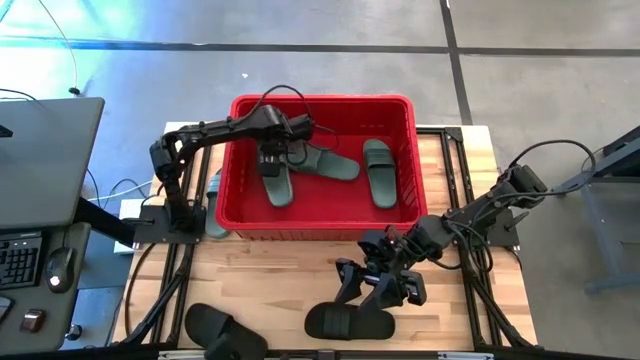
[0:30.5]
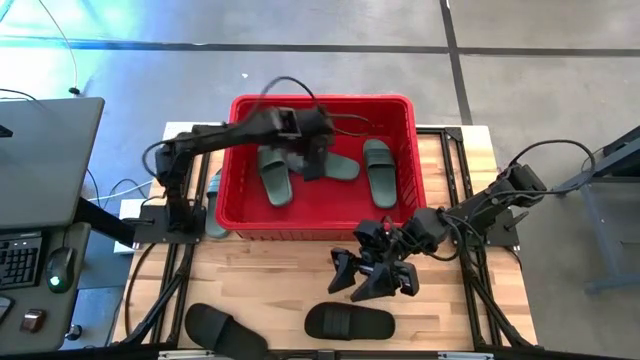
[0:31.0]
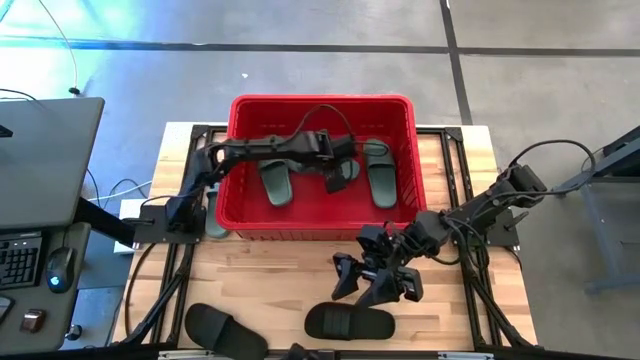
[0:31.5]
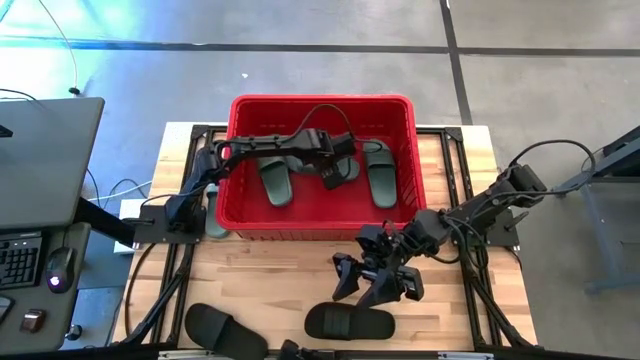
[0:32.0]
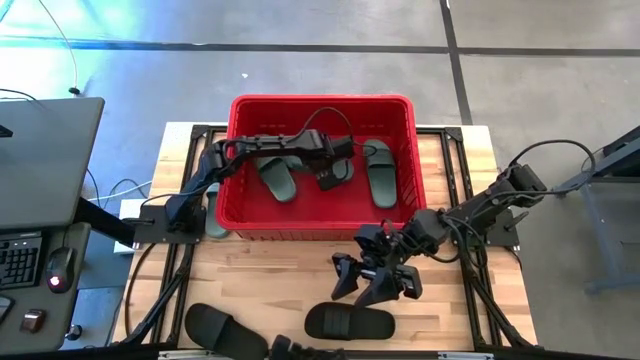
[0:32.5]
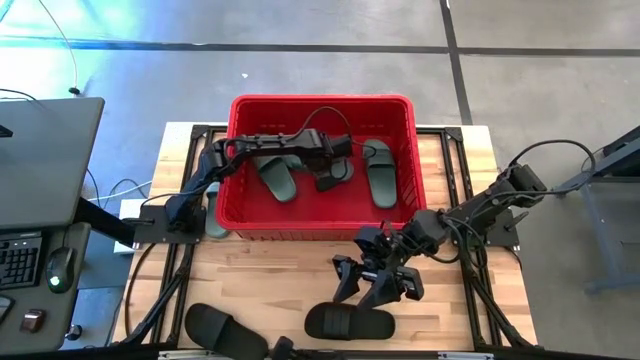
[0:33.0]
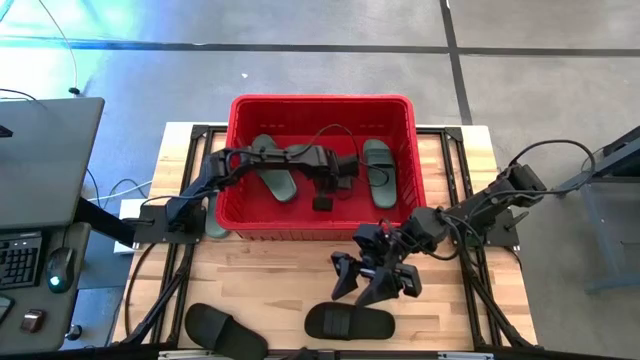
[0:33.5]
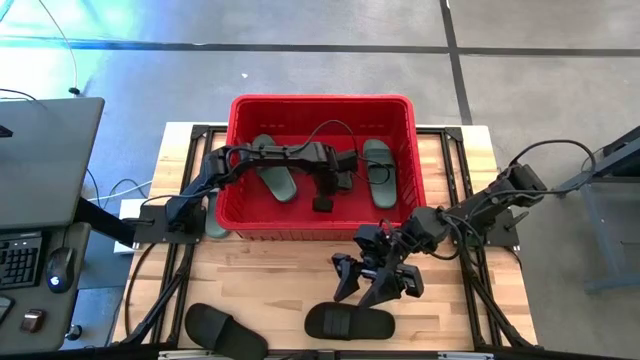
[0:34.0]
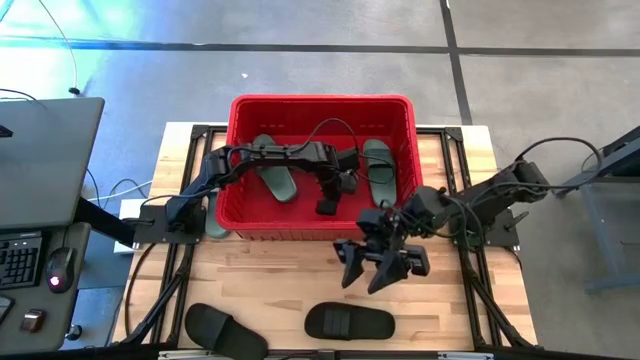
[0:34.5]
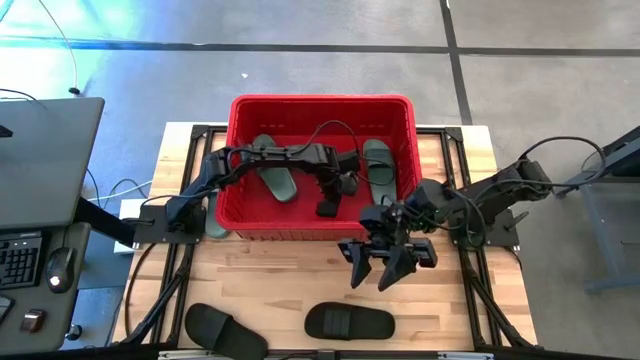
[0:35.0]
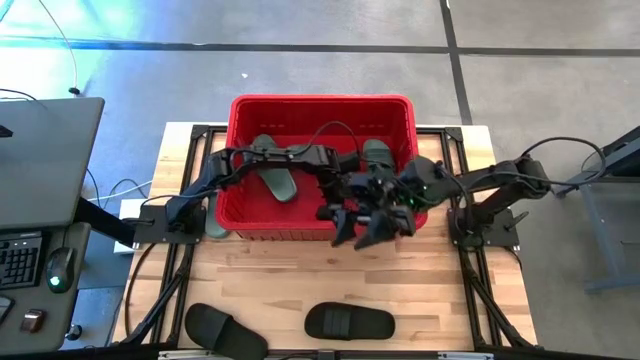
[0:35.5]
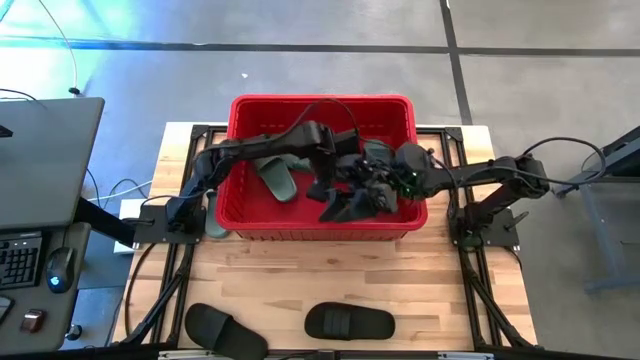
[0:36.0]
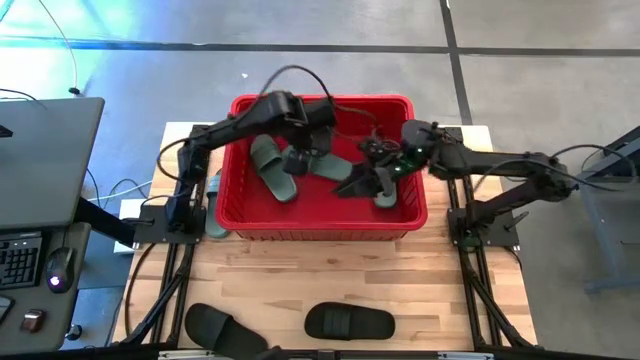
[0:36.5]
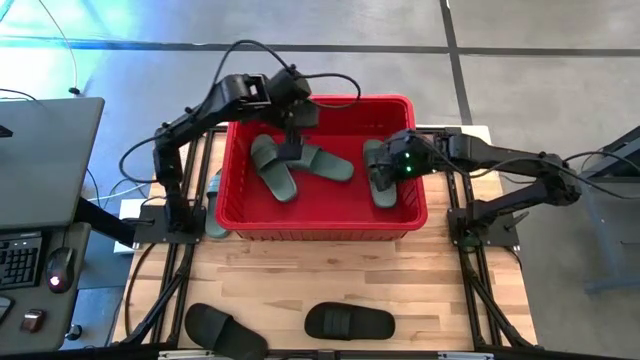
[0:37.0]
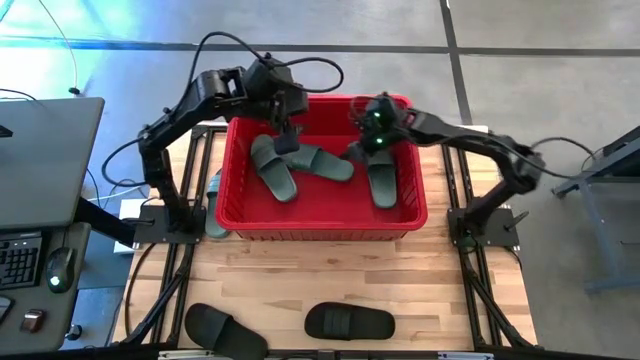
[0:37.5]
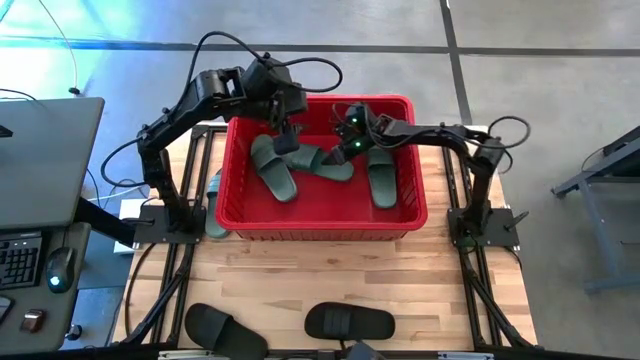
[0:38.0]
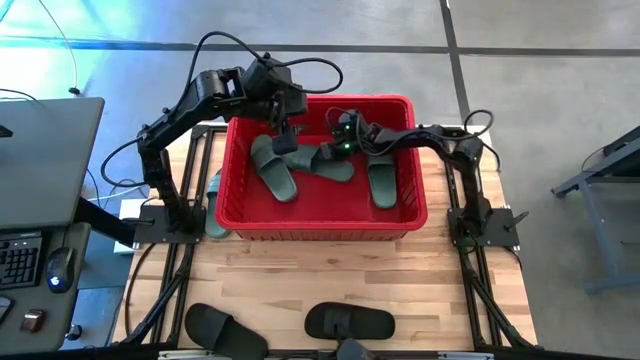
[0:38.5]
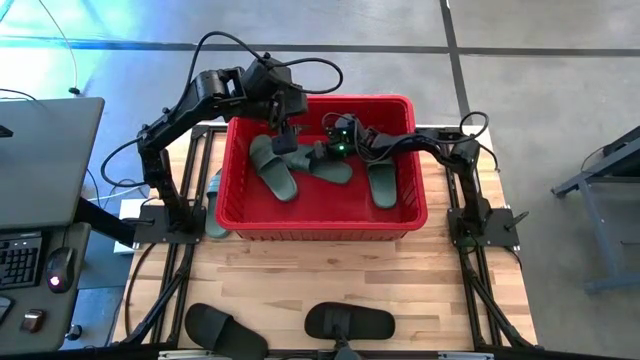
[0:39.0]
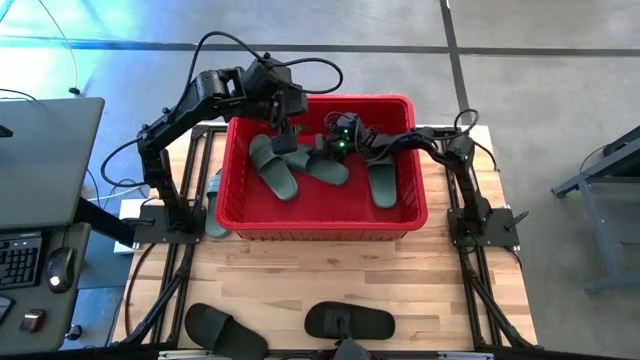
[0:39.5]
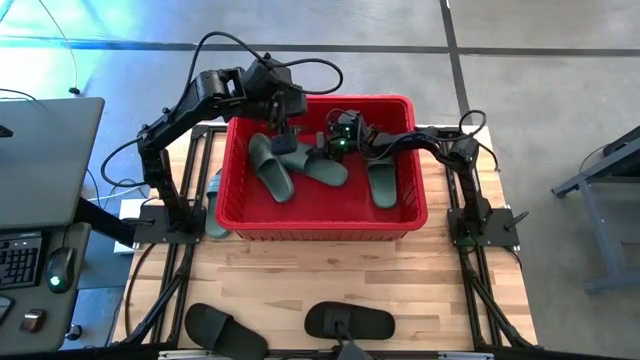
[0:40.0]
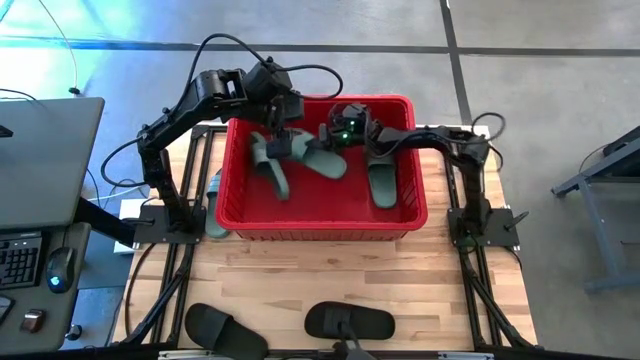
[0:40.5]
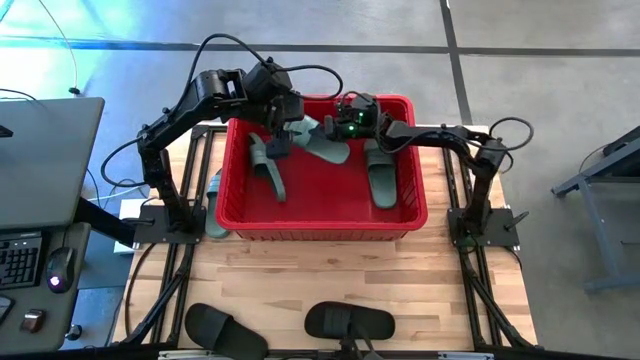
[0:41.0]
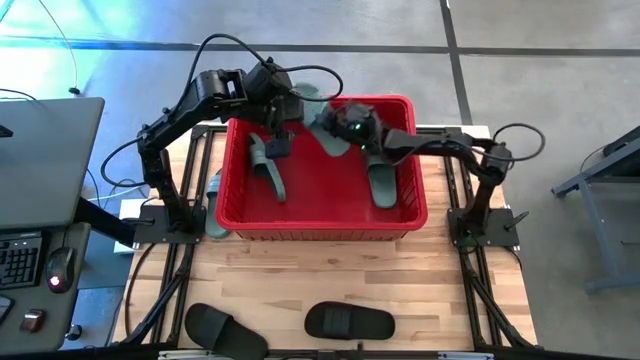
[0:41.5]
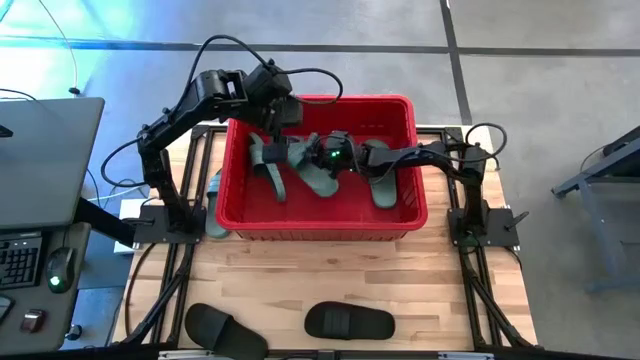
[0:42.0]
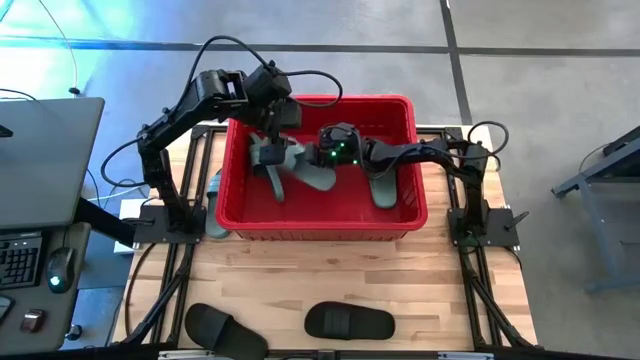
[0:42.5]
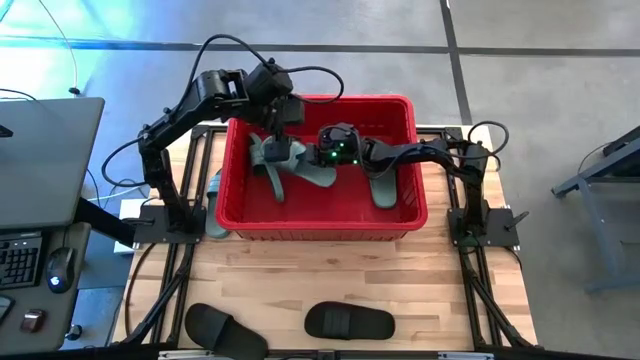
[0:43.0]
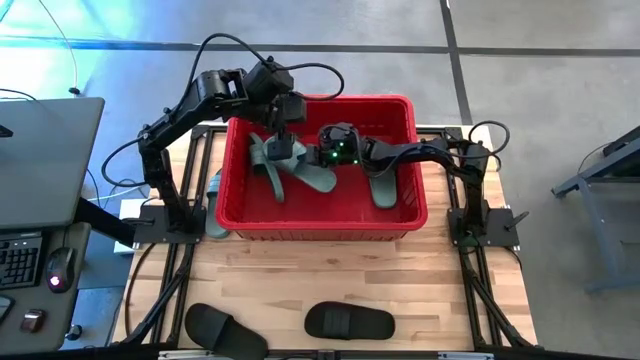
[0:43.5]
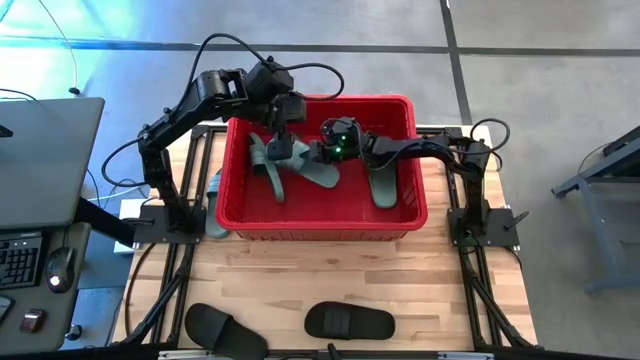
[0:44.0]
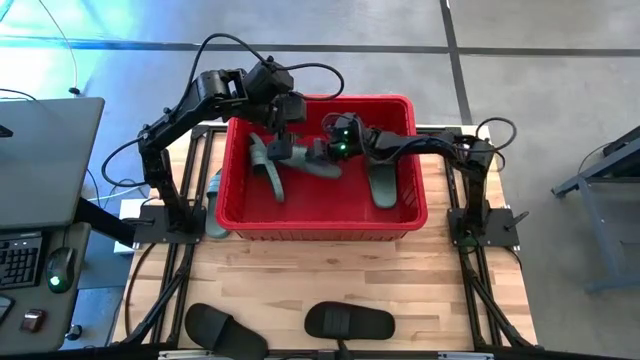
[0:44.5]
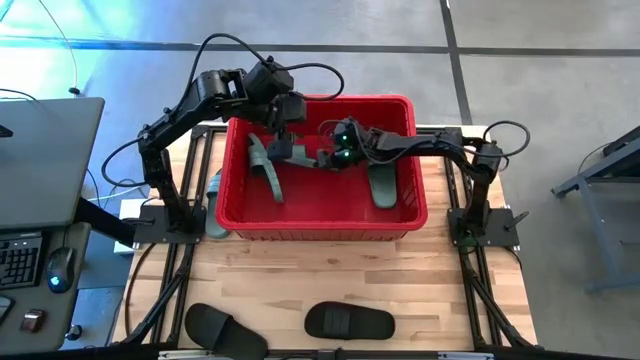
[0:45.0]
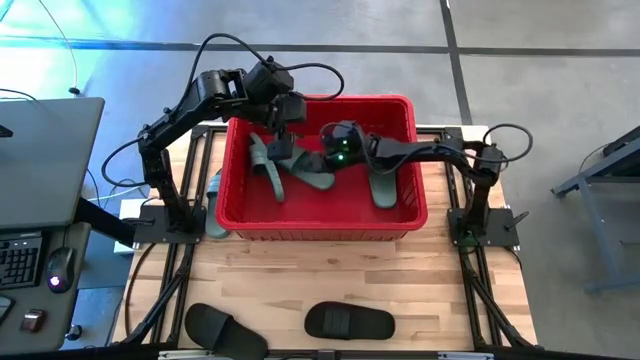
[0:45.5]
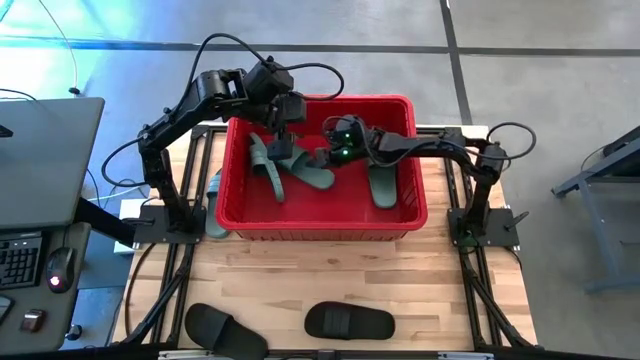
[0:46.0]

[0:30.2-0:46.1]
Task: Pick and place slides into bin
Adjust the slides in the red bin

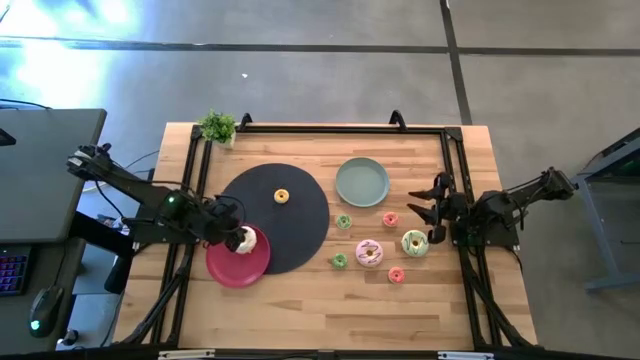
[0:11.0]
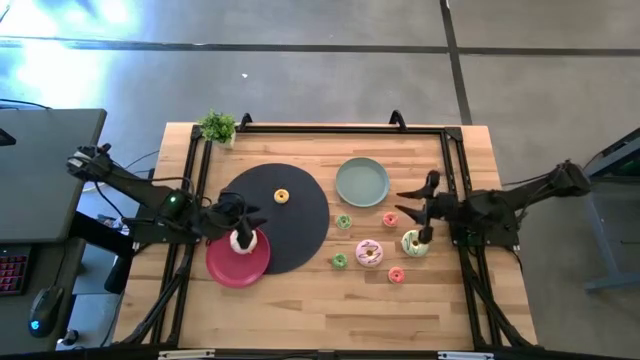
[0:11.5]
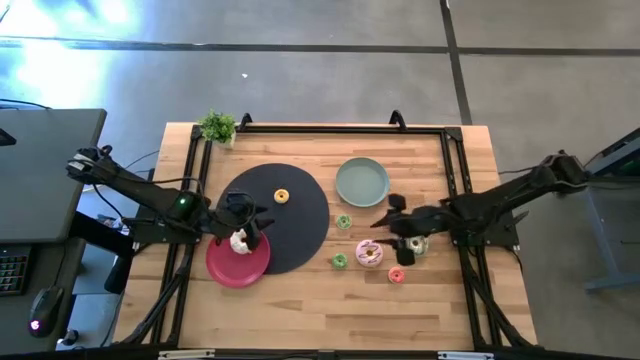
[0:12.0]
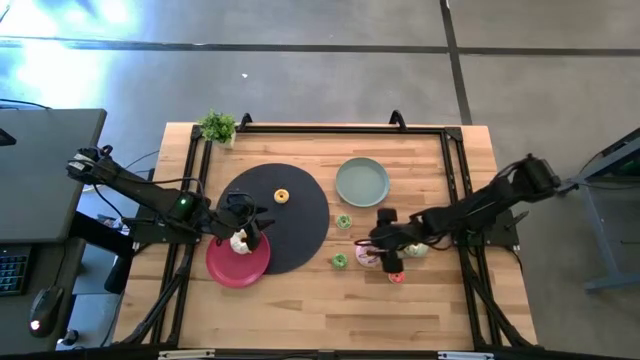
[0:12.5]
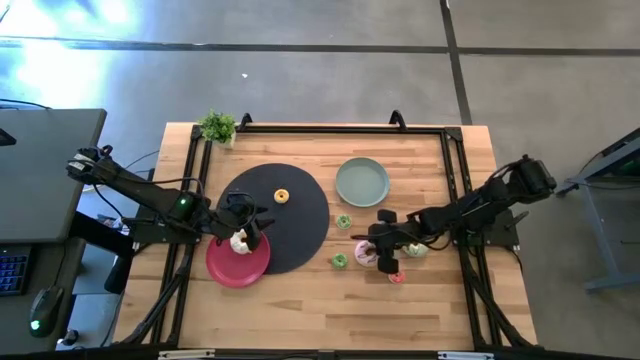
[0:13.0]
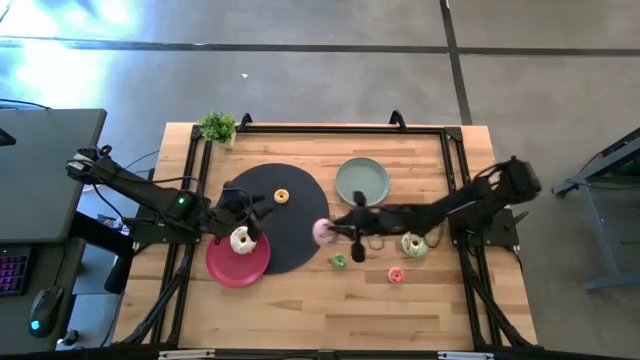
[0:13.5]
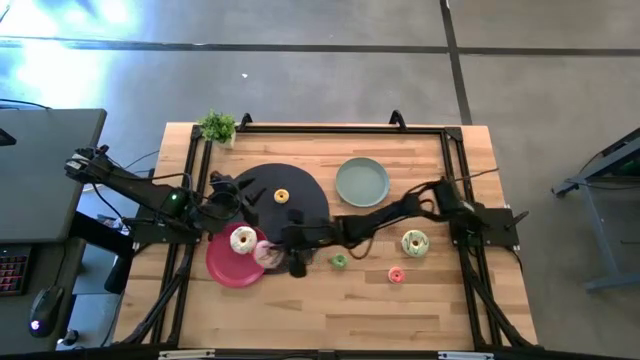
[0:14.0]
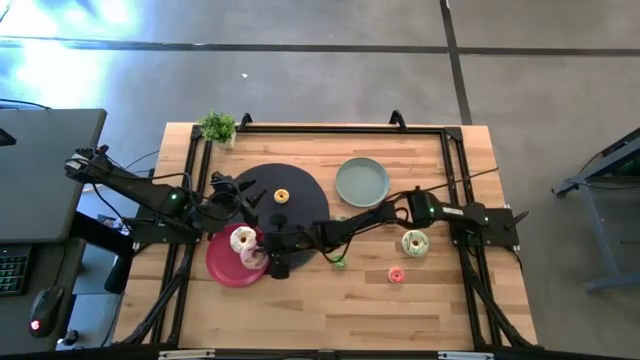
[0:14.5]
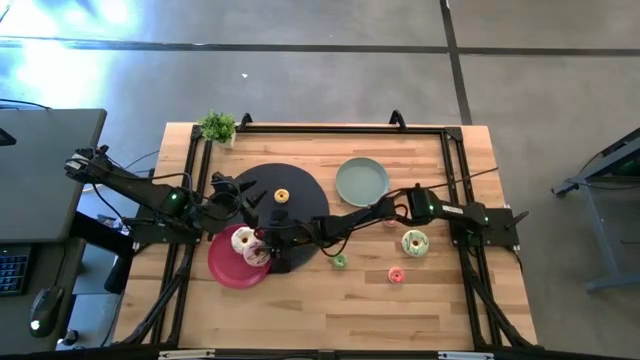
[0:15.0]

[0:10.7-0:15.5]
Task: Pick & Place donuts
Put the big purple donut on the red plate
